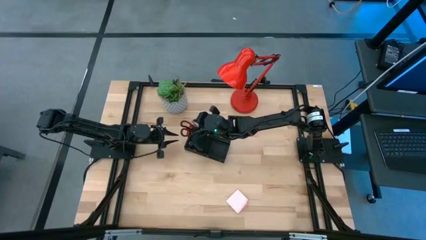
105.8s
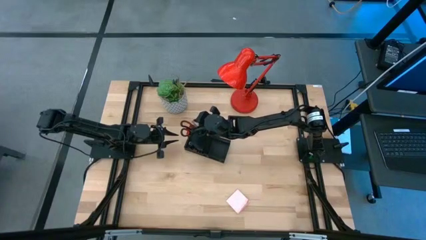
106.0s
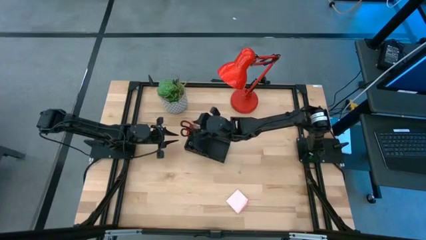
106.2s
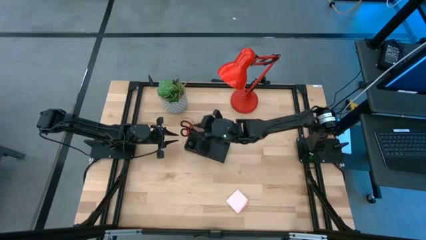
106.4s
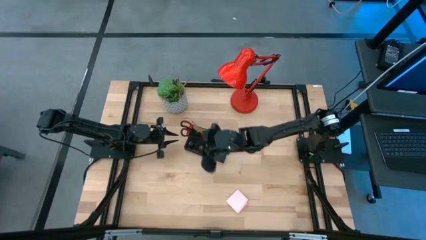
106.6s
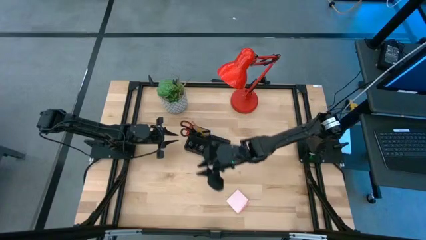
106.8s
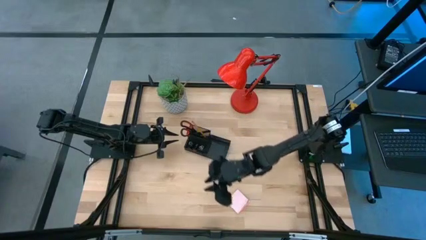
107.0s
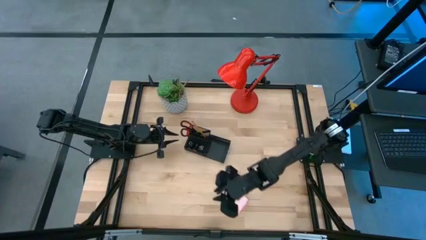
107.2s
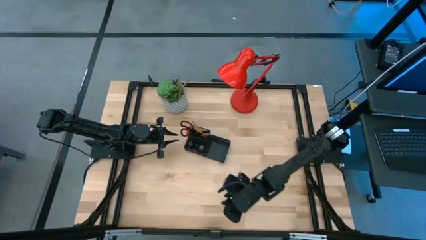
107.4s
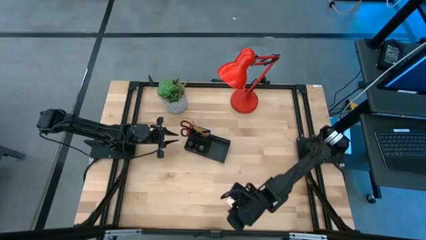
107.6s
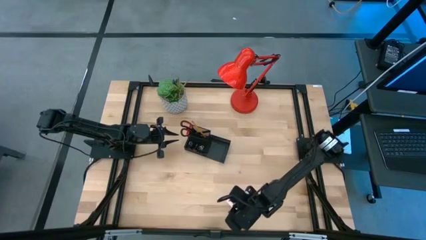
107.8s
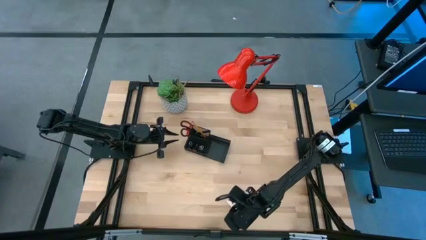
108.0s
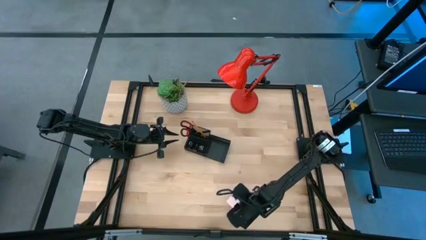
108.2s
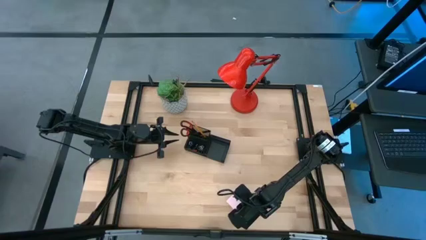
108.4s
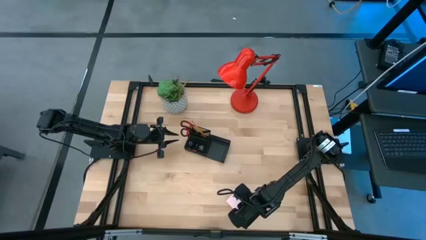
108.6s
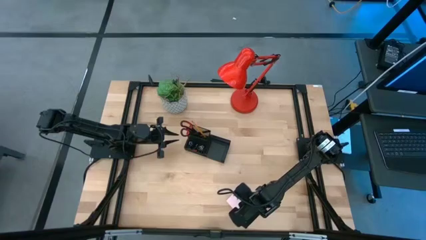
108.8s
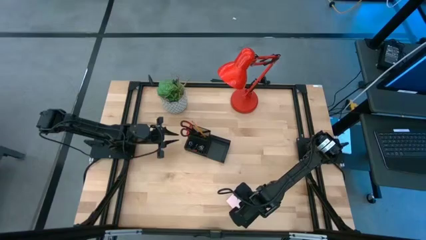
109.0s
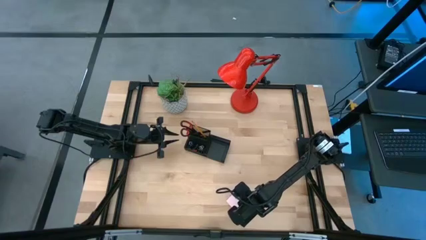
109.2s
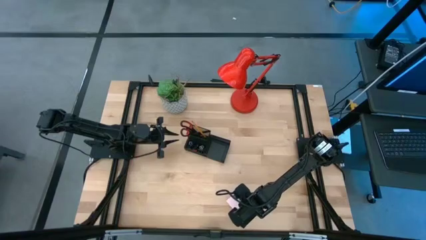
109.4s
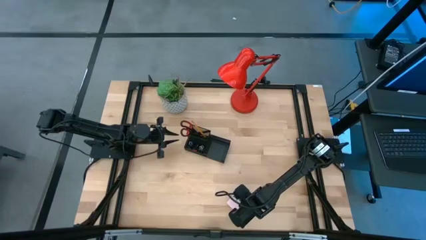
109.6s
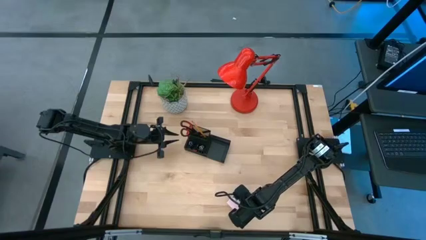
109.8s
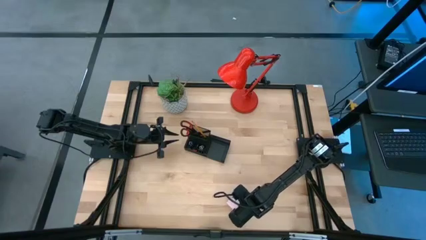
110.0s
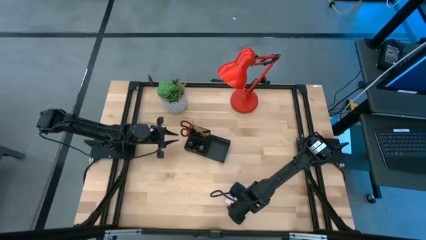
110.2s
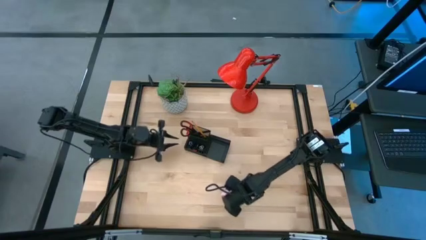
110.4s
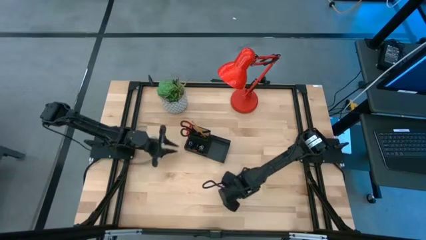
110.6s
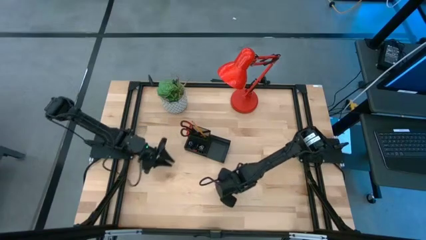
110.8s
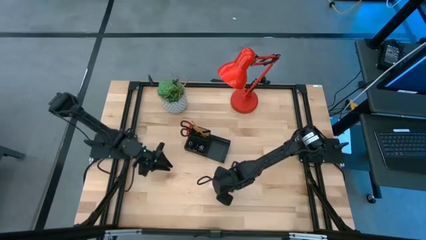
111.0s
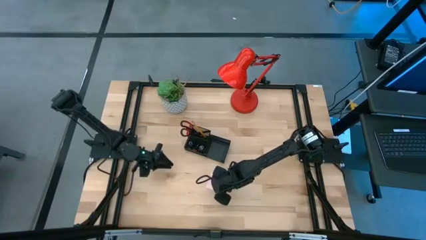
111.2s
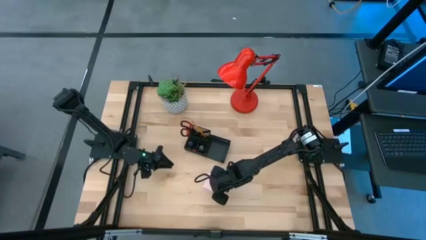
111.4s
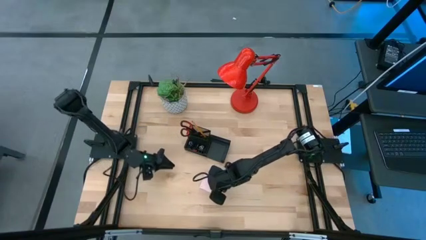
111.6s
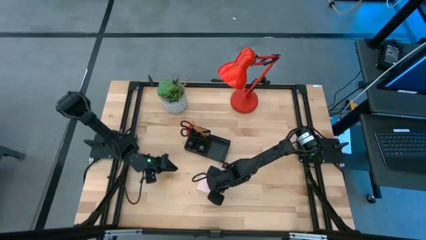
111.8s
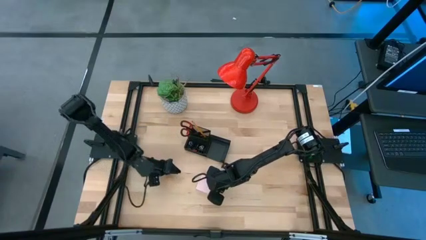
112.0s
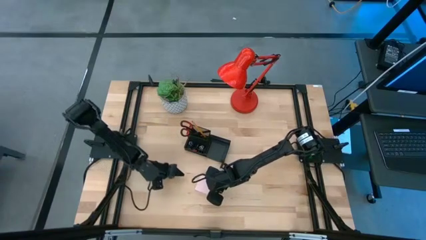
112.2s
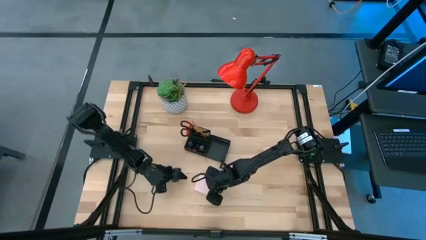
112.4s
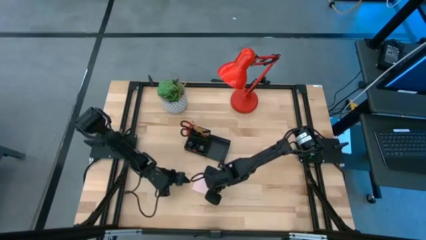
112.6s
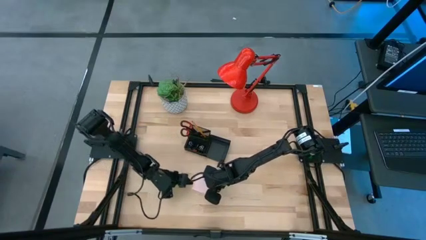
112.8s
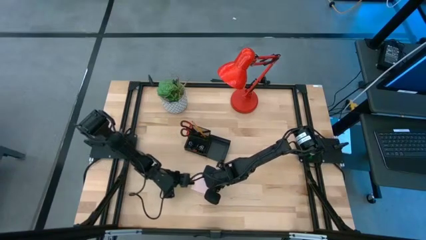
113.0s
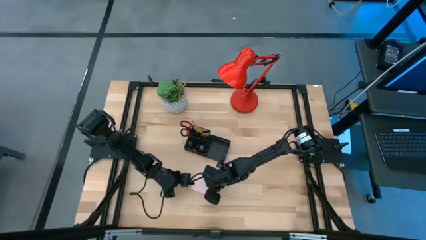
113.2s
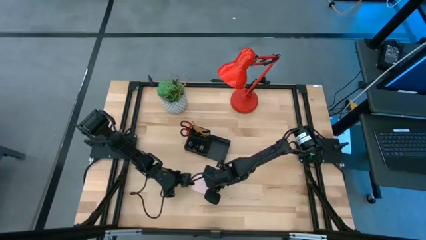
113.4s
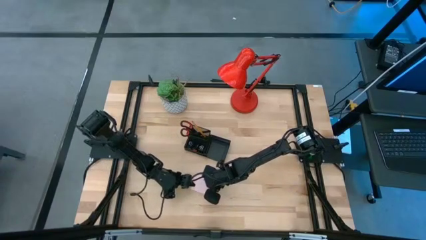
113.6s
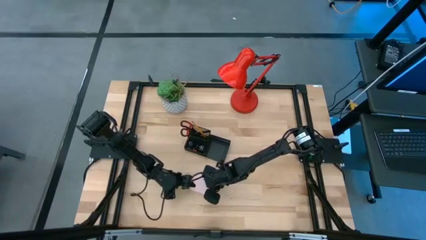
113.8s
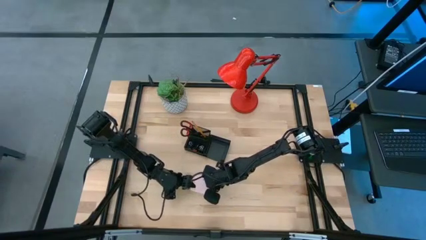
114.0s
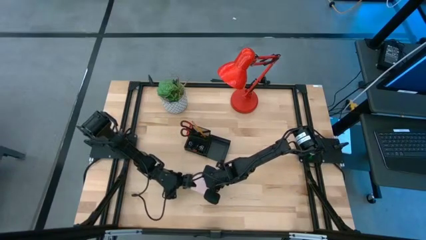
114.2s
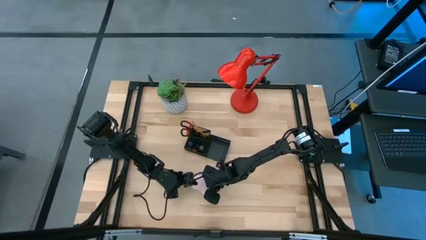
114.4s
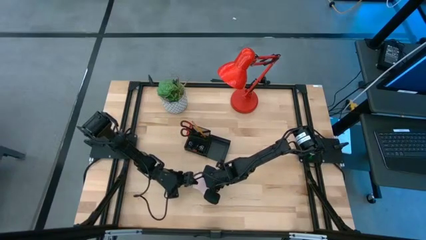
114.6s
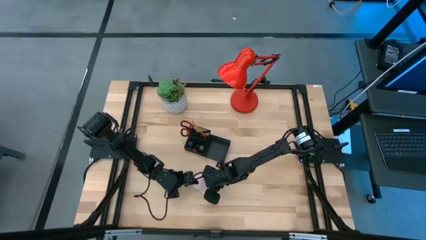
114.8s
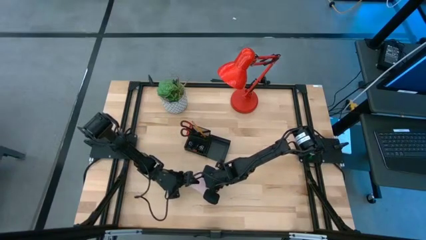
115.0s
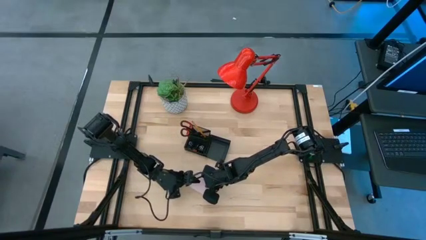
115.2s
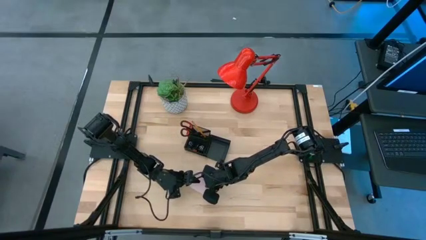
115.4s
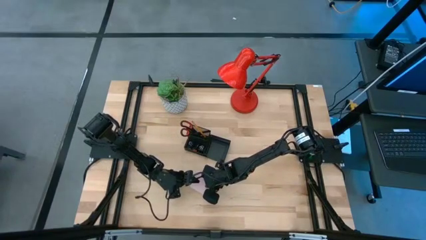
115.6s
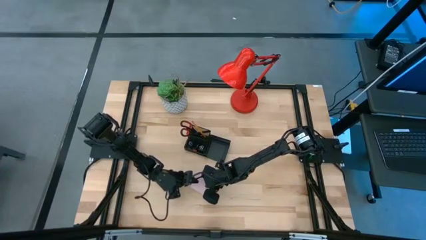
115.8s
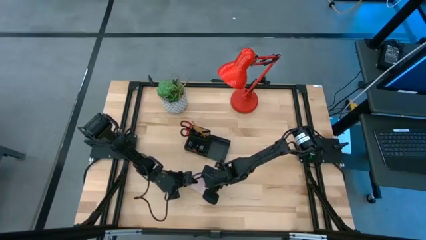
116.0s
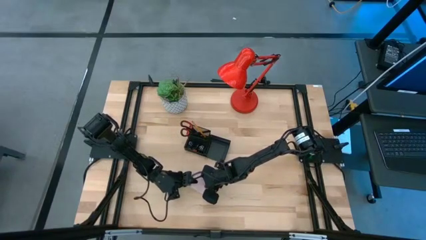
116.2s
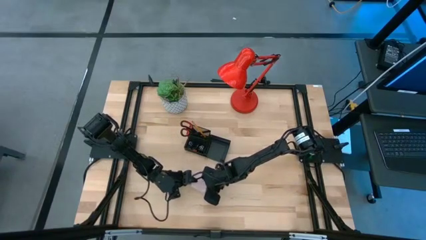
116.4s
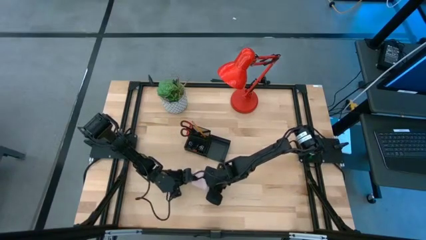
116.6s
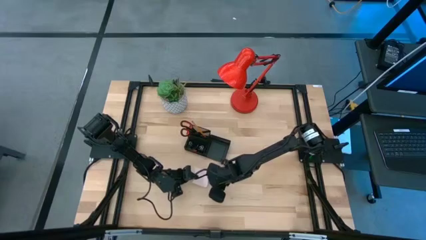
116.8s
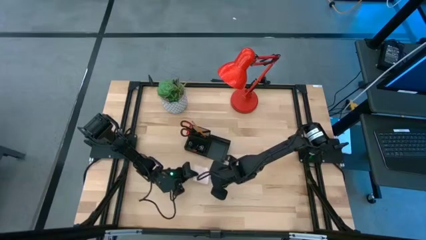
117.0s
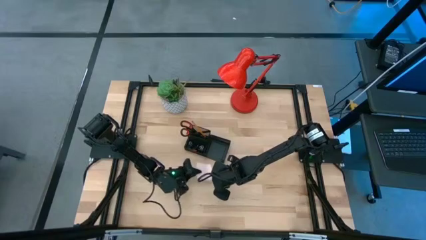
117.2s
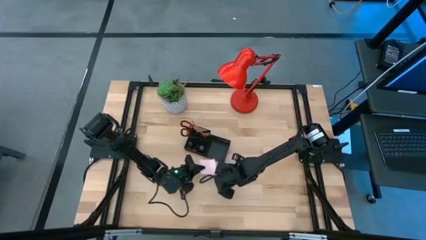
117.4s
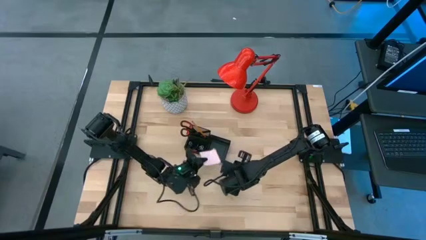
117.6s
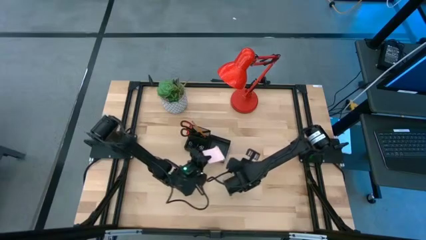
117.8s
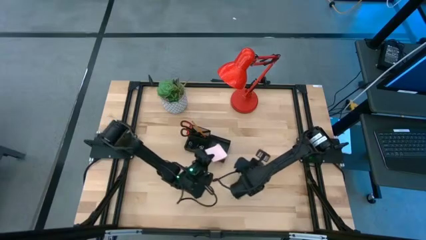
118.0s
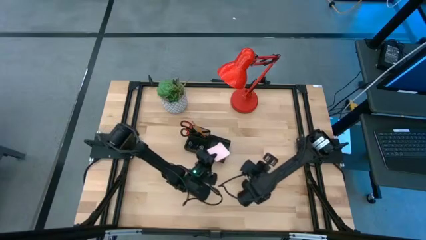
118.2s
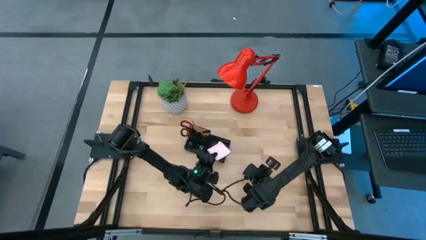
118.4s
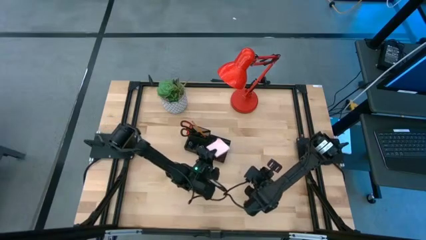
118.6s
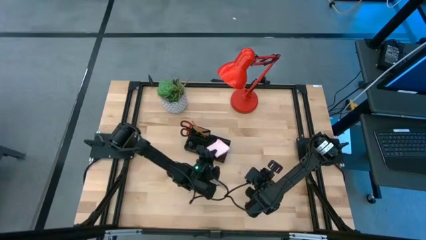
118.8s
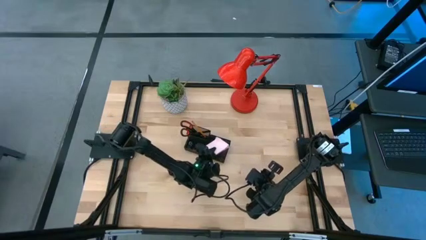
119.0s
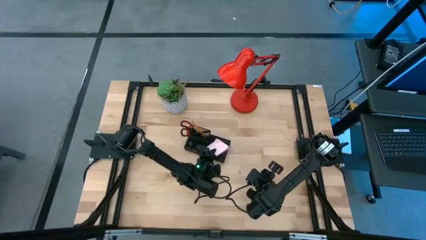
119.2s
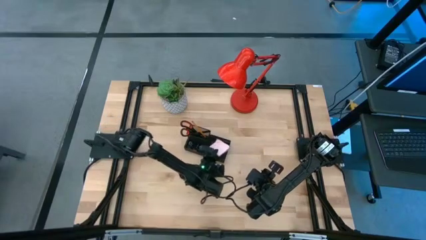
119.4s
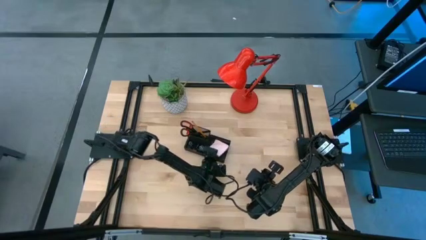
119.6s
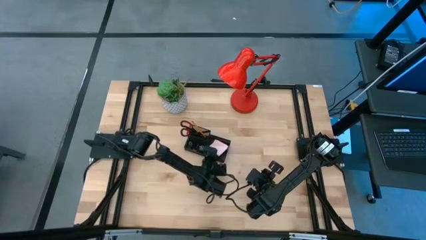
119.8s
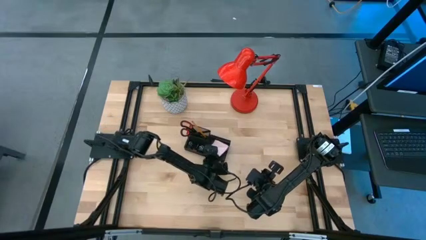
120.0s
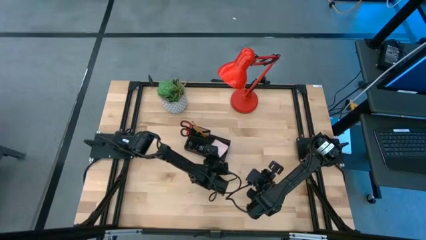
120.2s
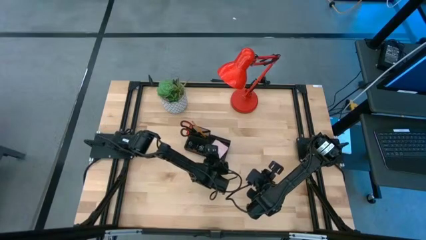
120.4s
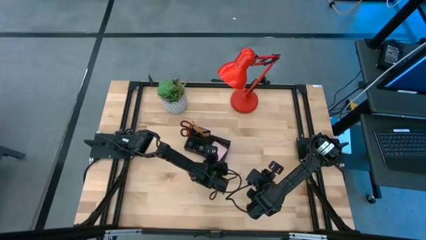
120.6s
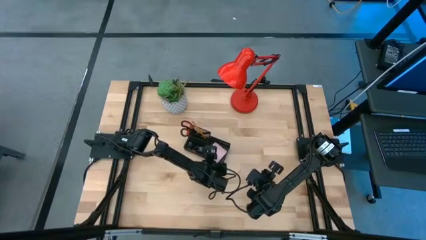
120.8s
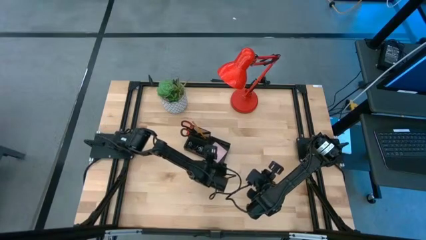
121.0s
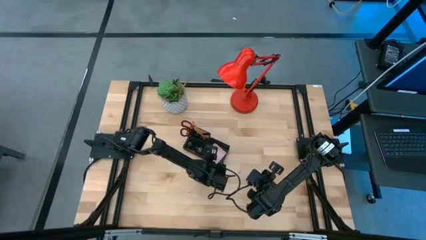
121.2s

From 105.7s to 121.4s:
Task: Pick and place office supplies into organizer
Put the pink sticky notes into the black desk organizer

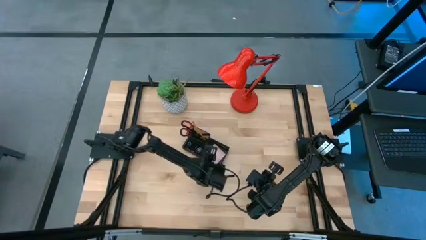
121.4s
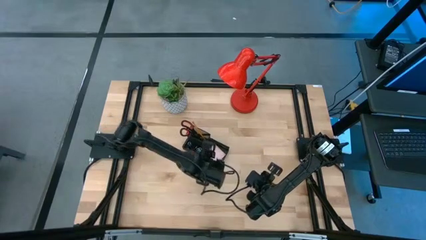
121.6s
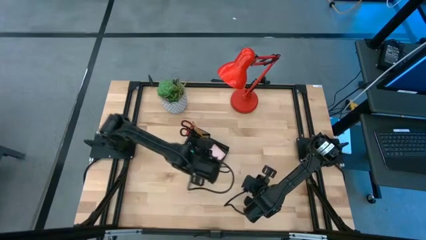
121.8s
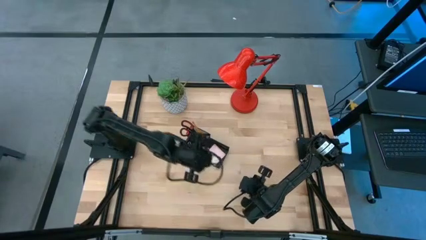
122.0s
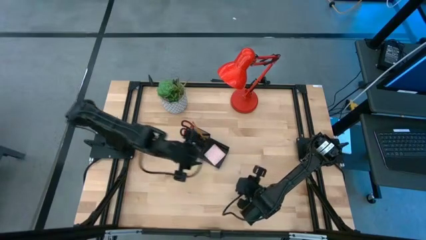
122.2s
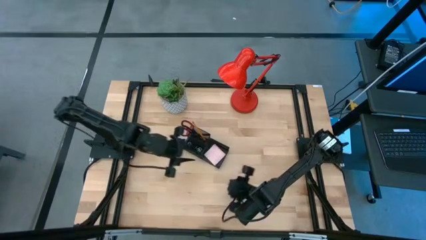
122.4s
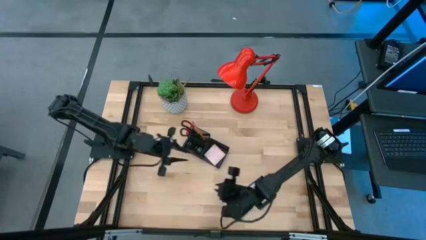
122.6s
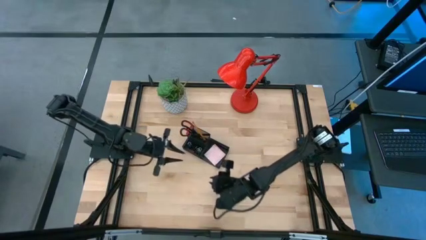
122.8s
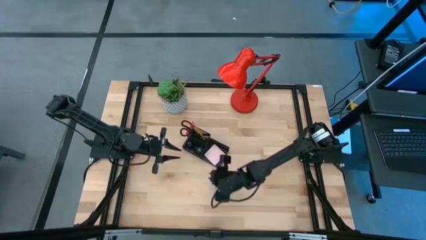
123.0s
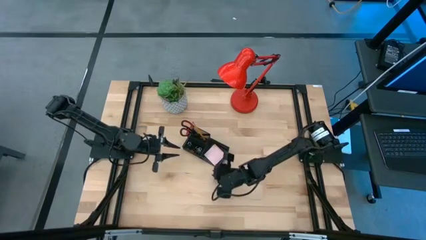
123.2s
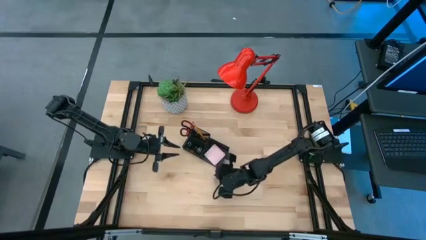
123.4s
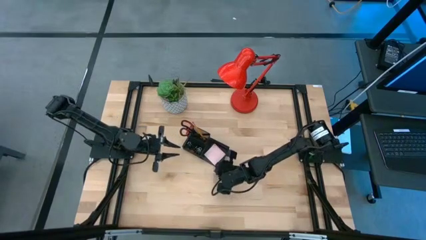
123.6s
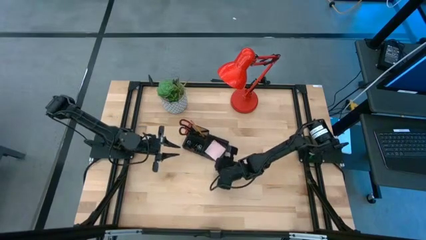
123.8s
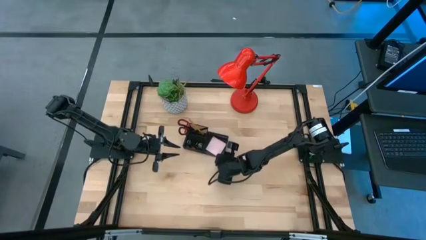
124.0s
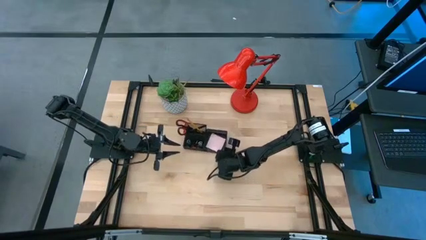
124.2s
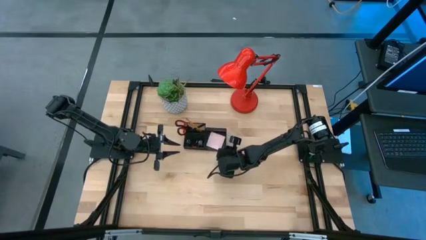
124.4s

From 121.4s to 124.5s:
Adjust the black desk organizer on the table
